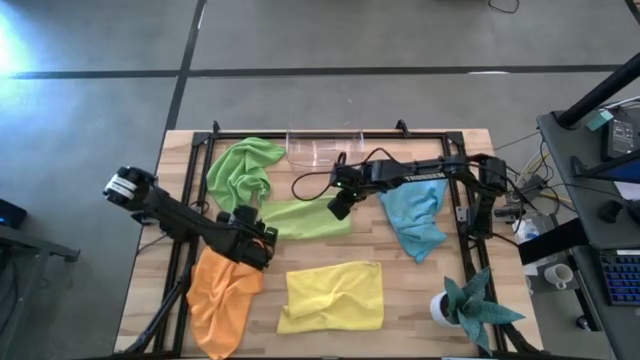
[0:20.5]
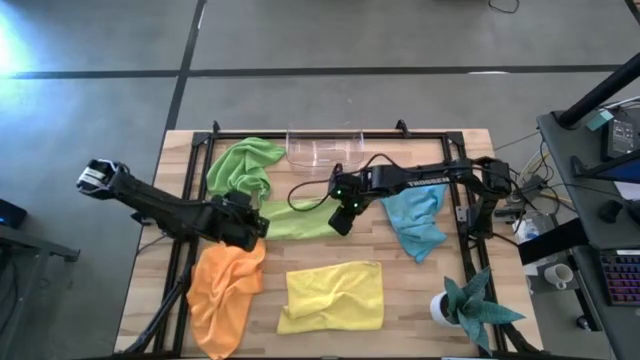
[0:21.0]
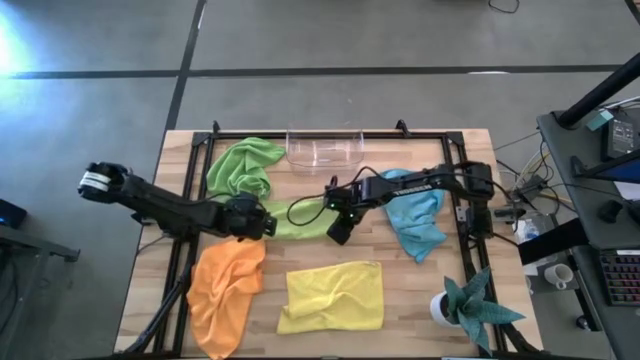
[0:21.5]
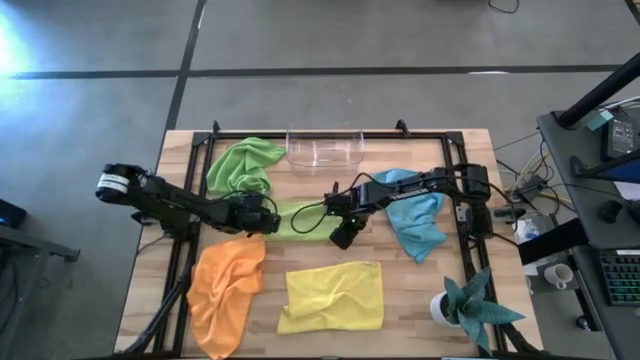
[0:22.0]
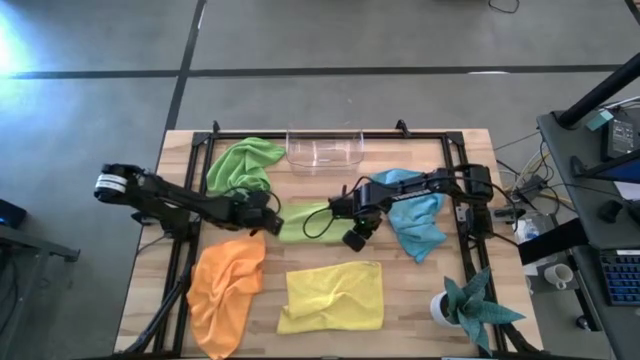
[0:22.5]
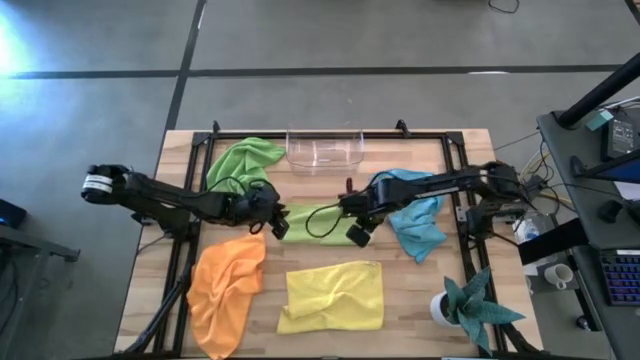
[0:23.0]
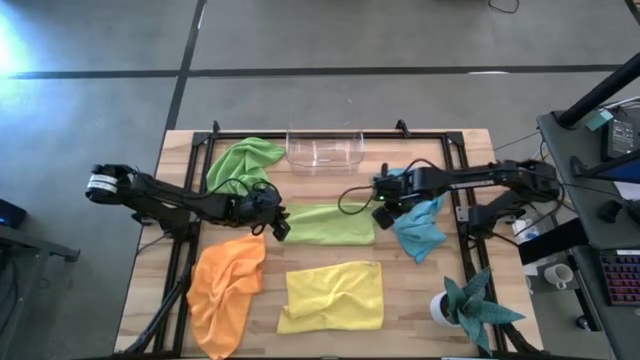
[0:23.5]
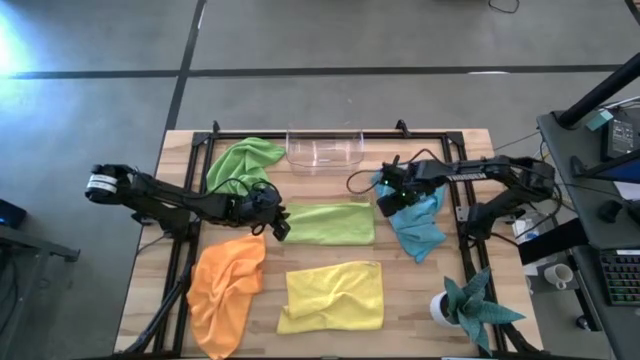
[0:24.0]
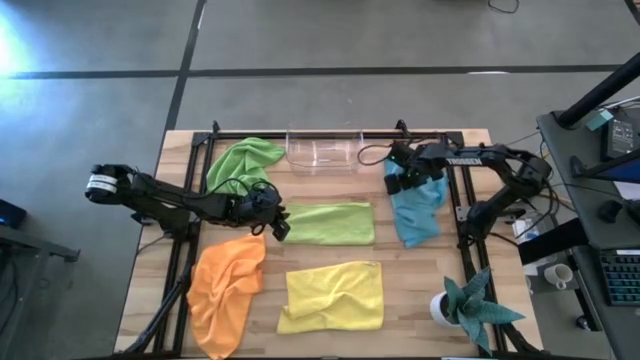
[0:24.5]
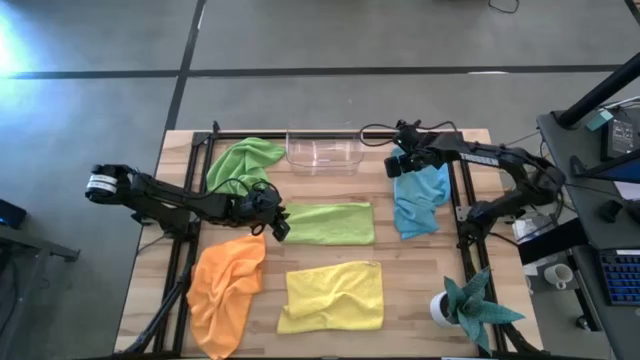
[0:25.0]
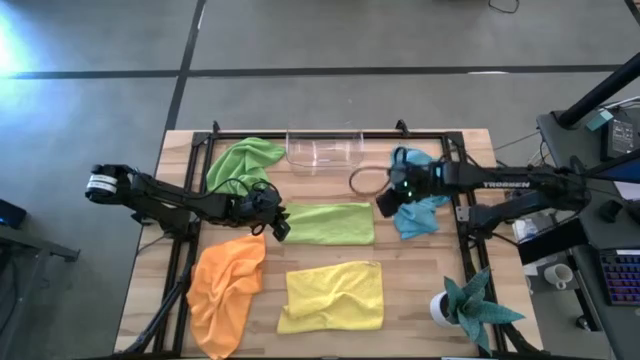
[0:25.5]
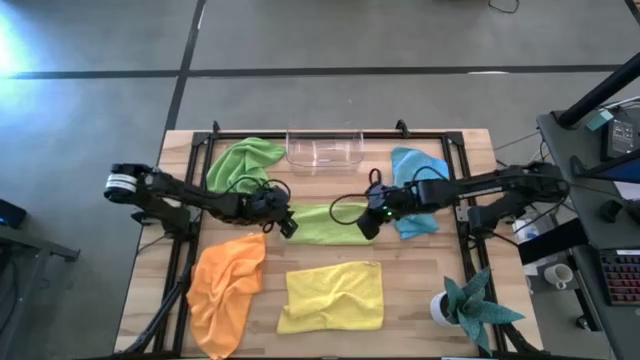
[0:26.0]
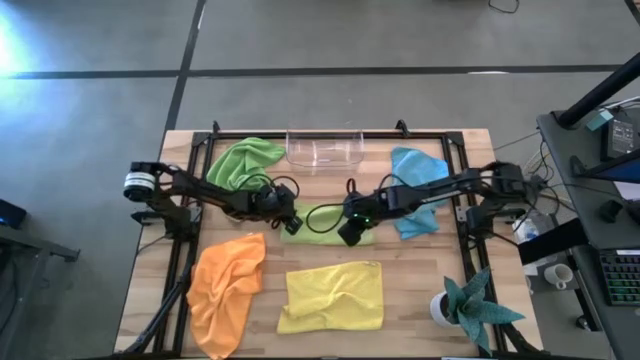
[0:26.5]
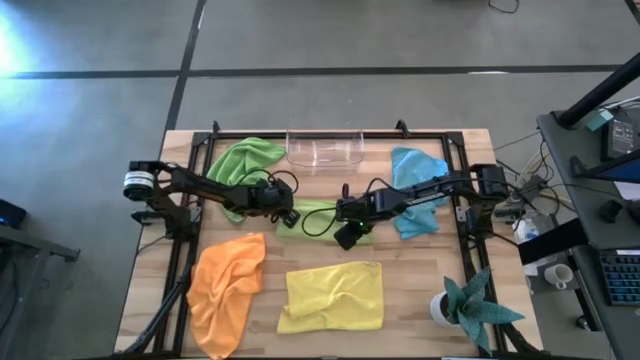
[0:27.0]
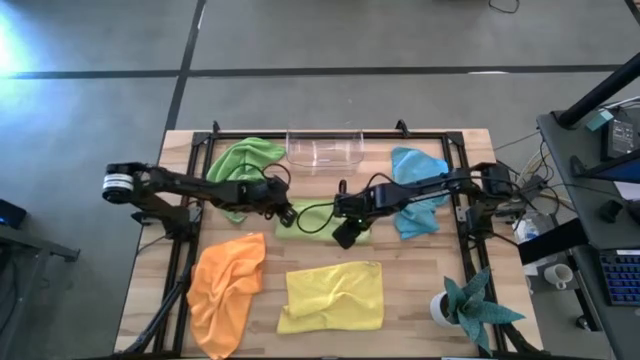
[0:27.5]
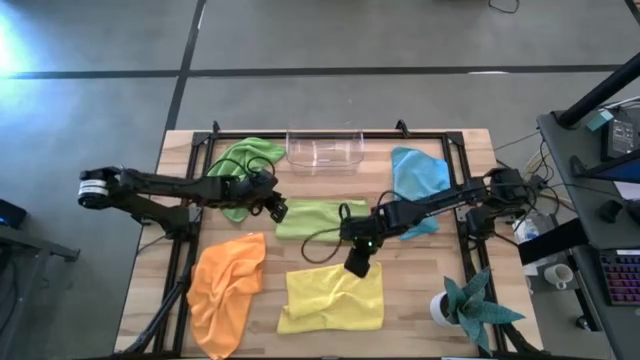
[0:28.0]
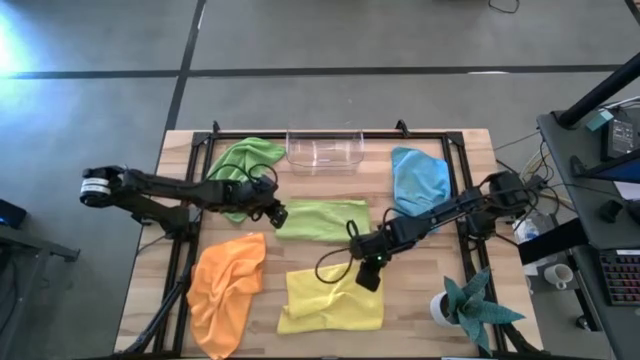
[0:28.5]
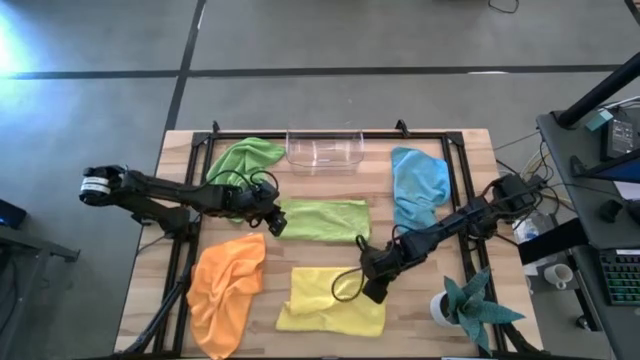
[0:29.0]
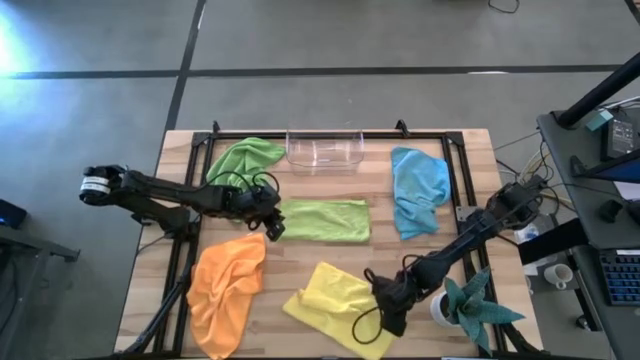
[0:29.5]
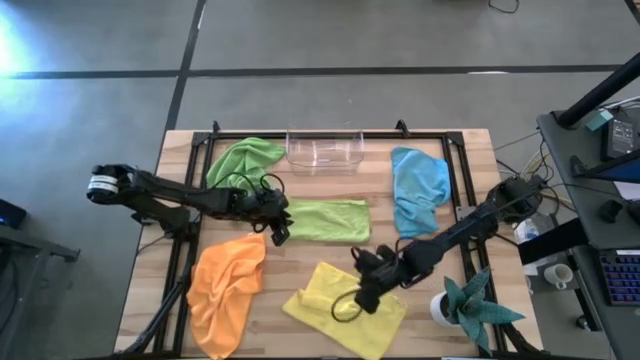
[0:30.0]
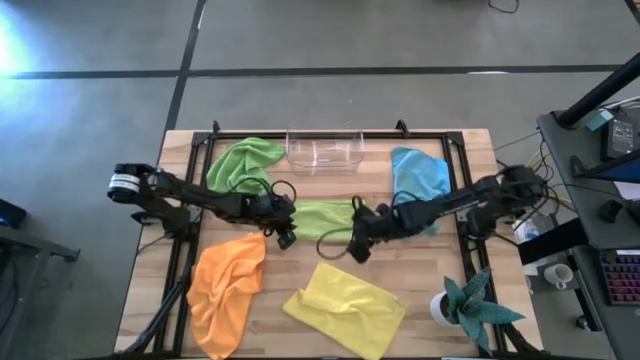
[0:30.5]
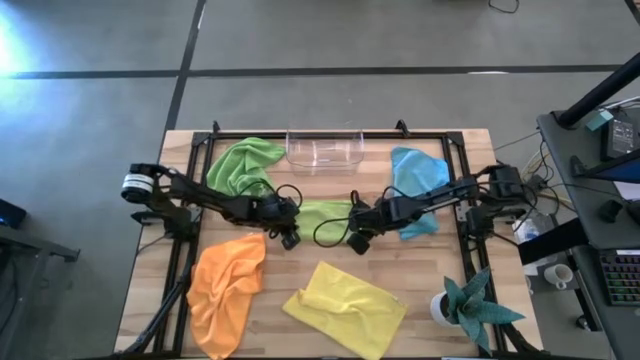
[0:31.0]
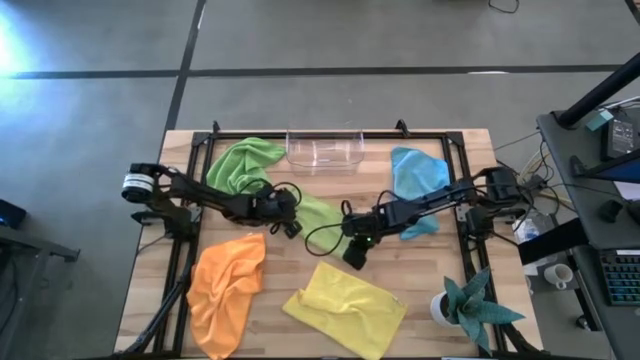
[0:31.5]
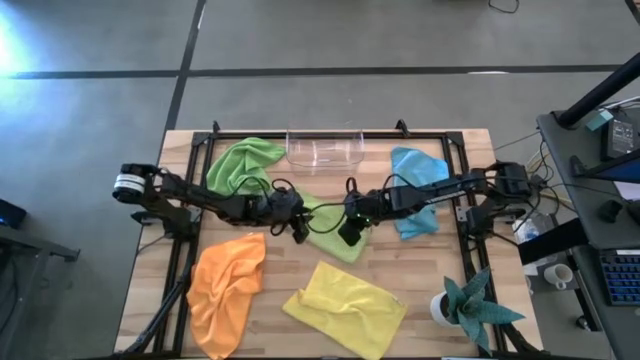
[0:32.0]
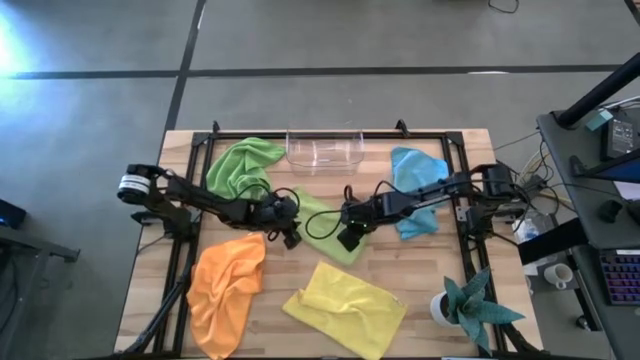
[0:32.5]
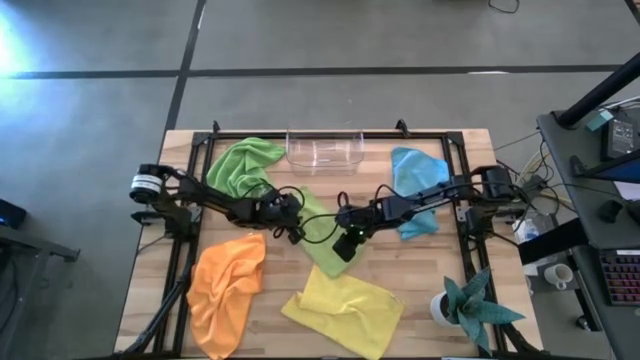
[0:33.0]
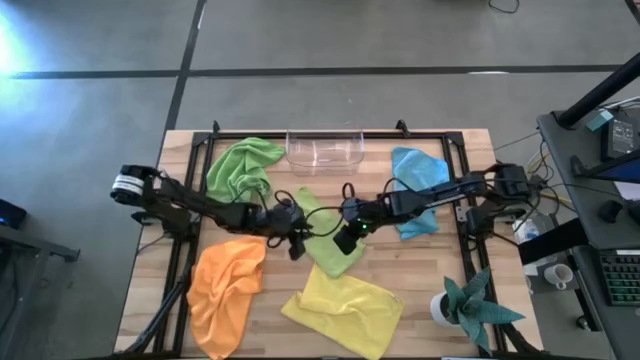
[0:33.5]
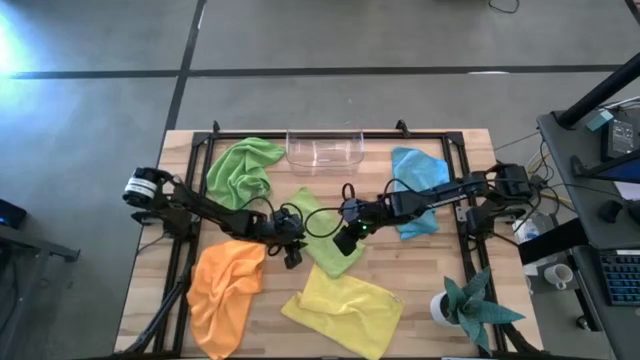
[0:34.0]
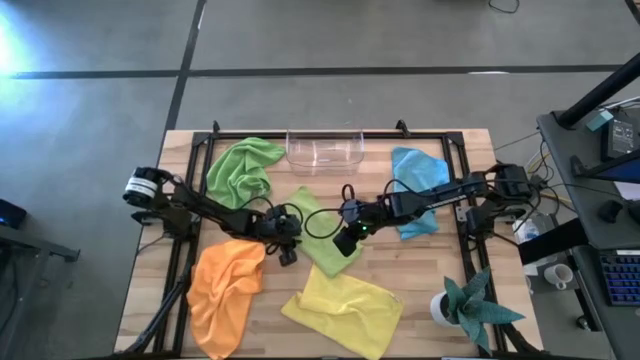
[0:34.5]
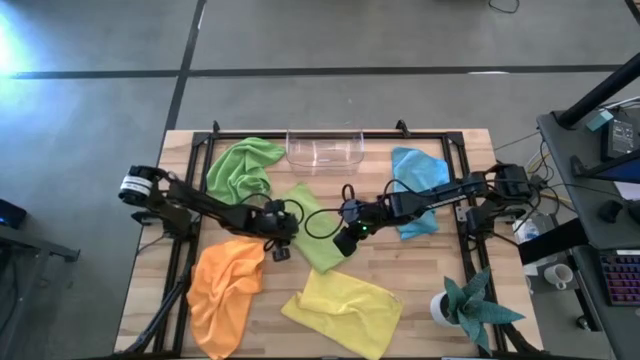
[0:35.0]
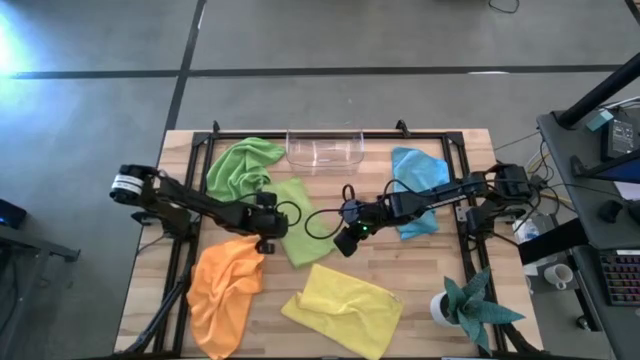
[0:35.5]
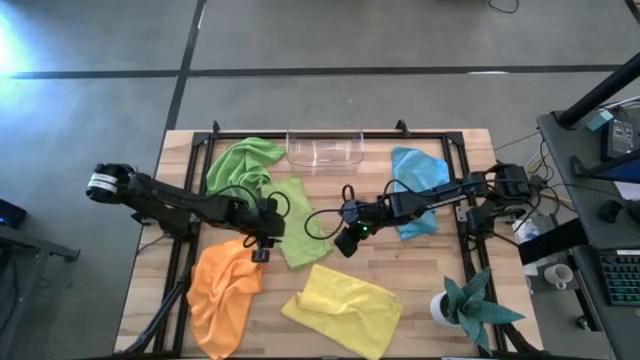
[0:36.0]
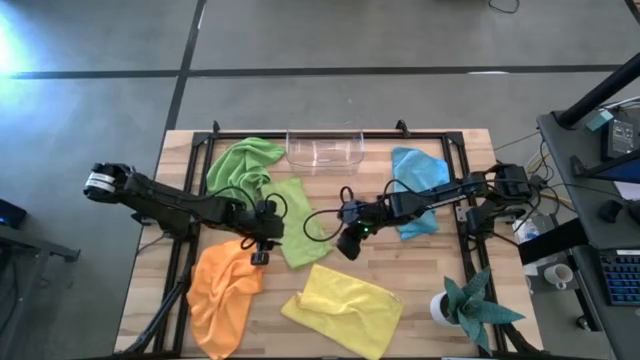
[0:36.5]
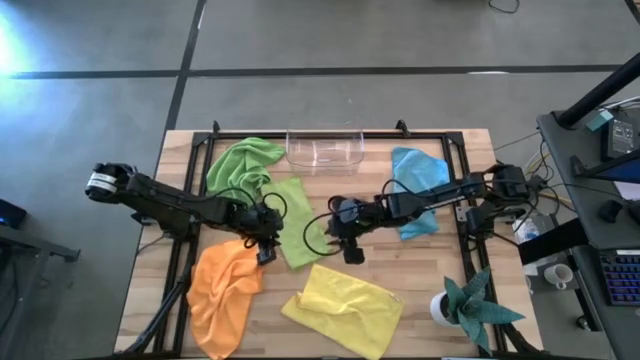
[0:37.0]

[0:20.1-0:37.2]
Task: Fold microfiber towels
Fold the green microfiber towel

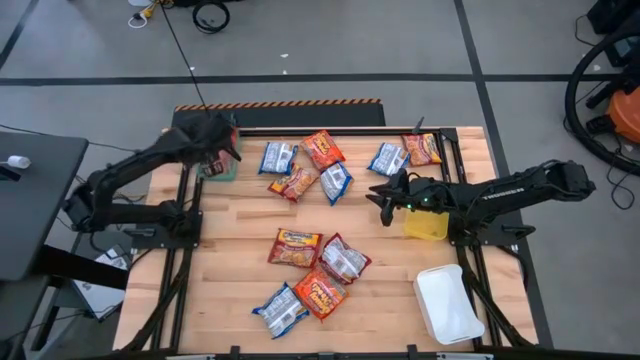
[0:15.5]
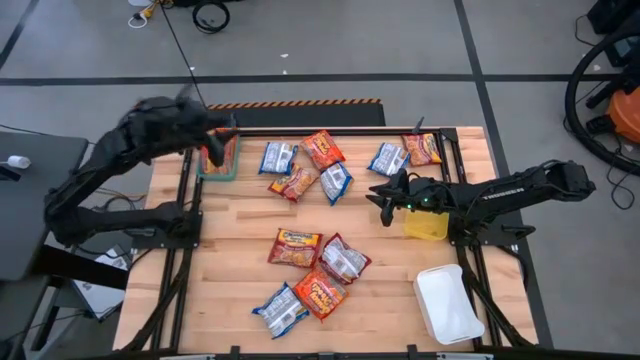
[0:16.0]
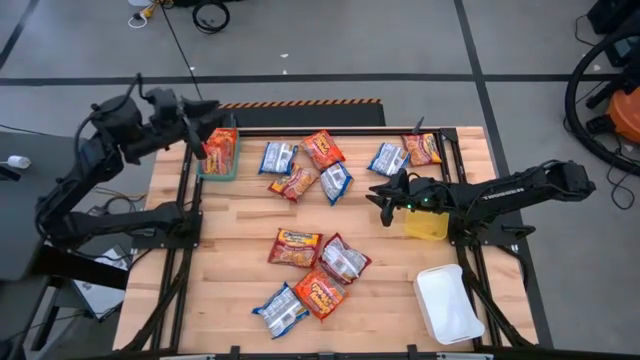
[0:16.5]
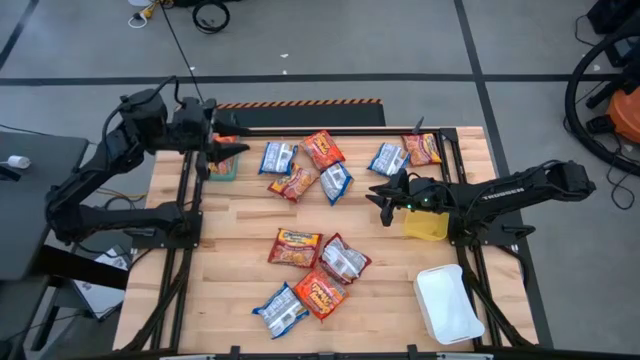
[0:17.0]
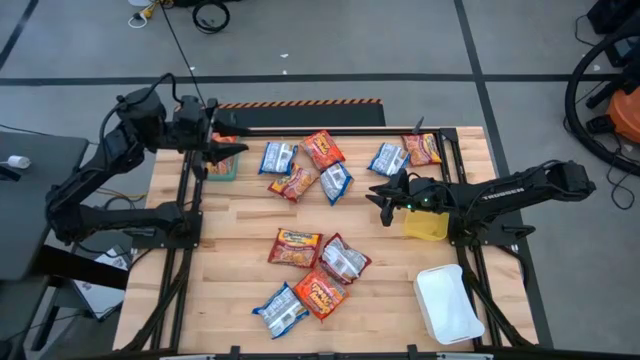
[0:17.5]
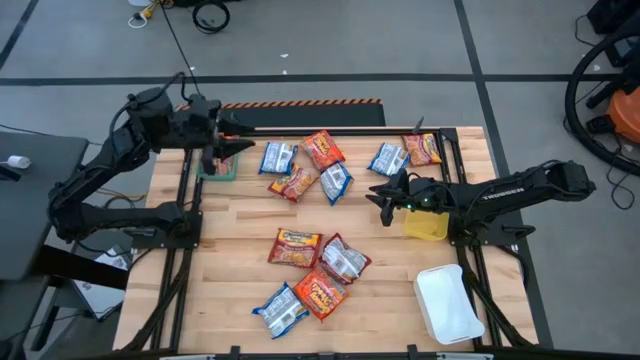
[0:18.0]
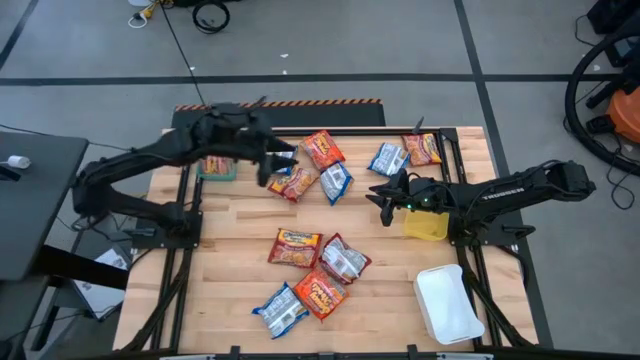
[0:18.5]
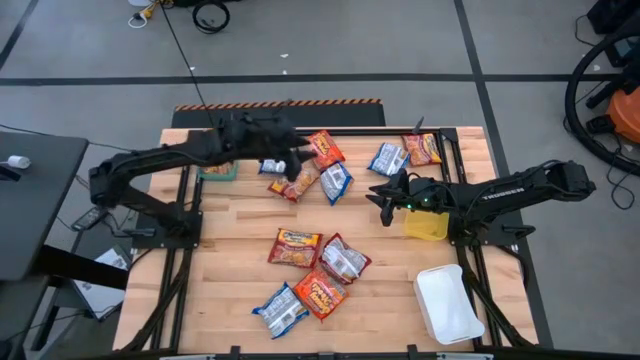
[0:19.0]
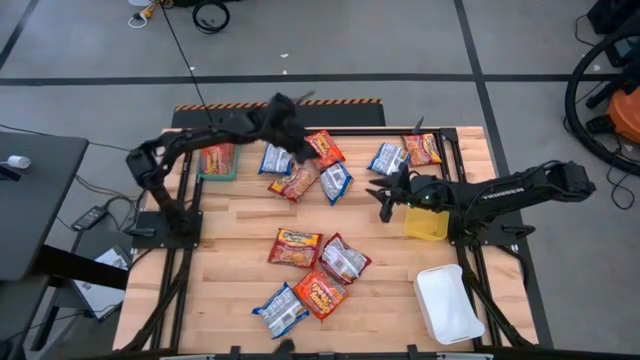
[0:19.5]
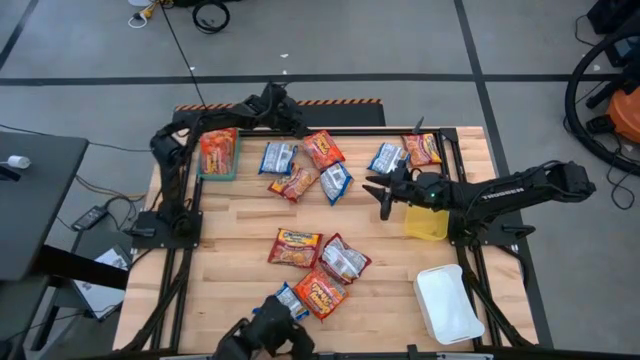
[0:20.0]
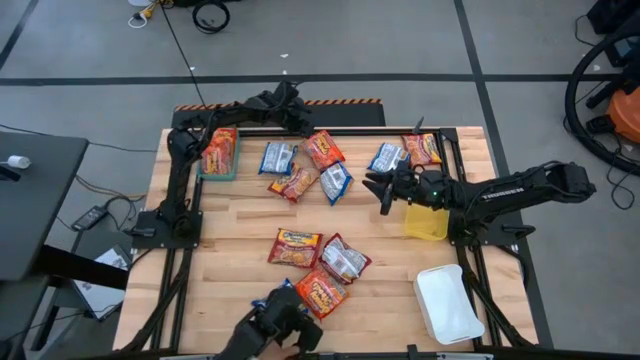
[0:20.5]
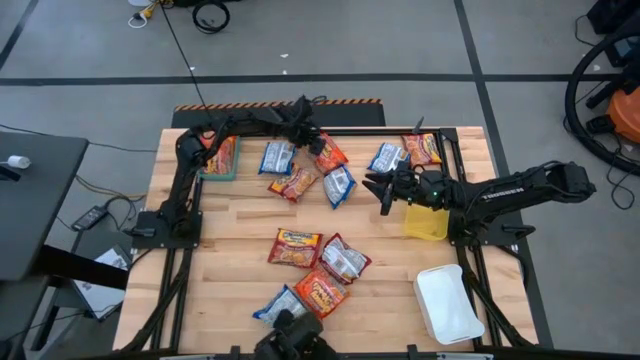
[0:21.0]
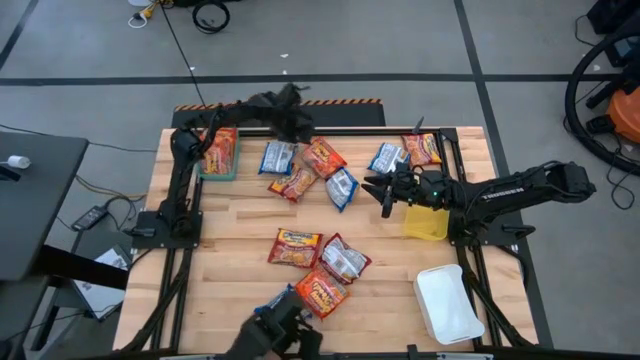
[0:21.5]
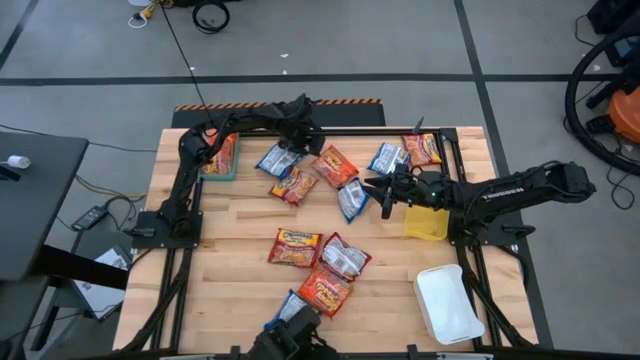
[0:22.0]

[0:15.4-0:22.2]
Task: Sort Maruchan noodles
Put the orange noodle pack into the green bin
